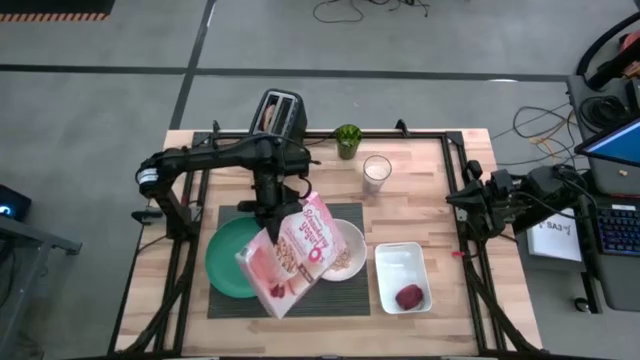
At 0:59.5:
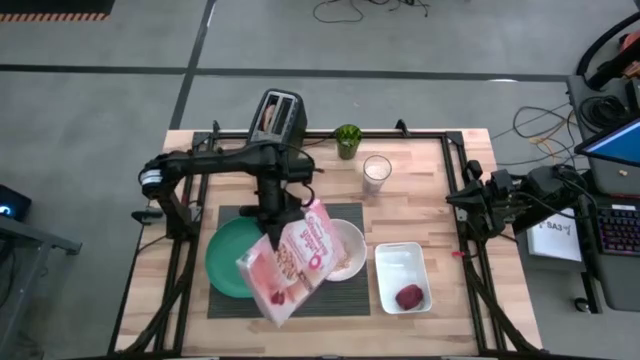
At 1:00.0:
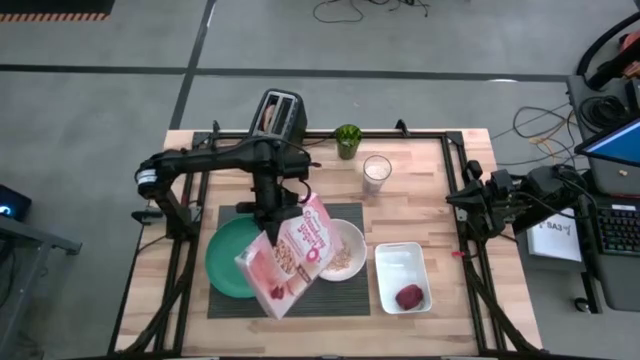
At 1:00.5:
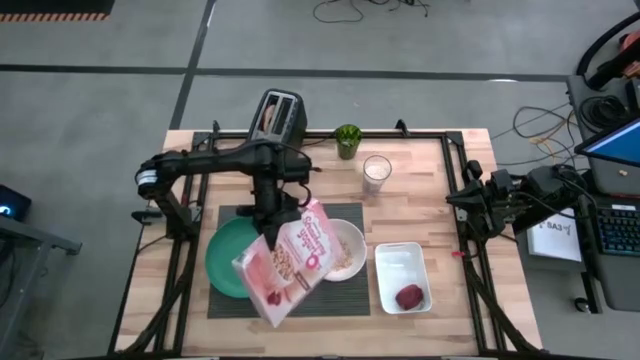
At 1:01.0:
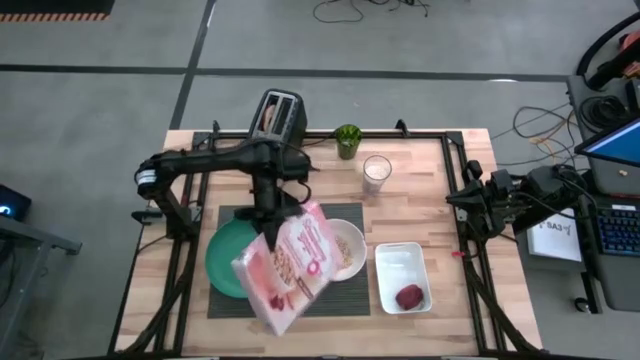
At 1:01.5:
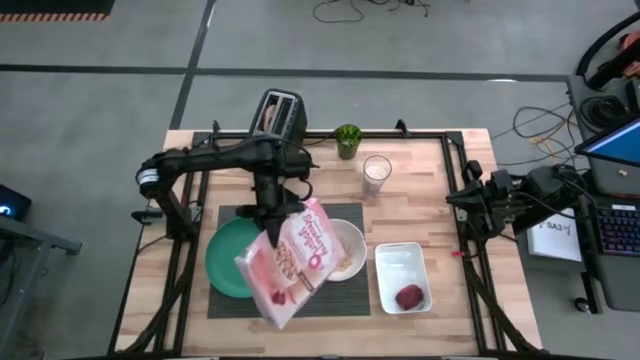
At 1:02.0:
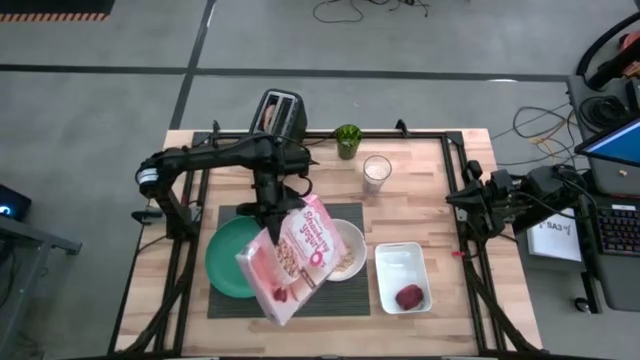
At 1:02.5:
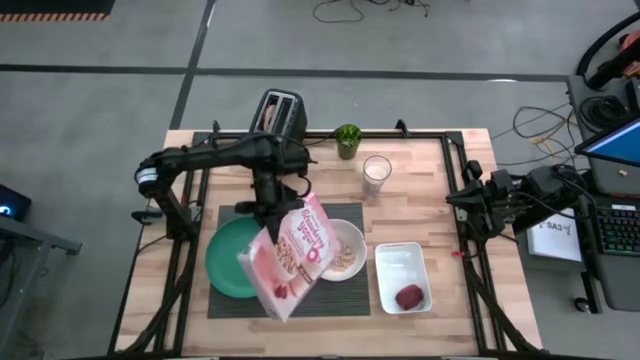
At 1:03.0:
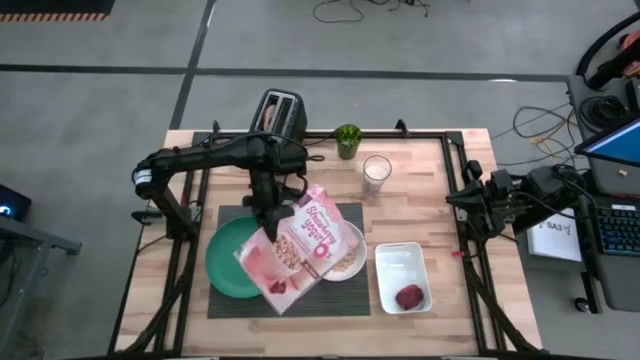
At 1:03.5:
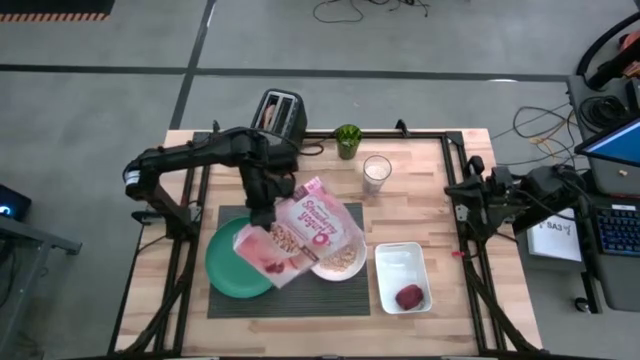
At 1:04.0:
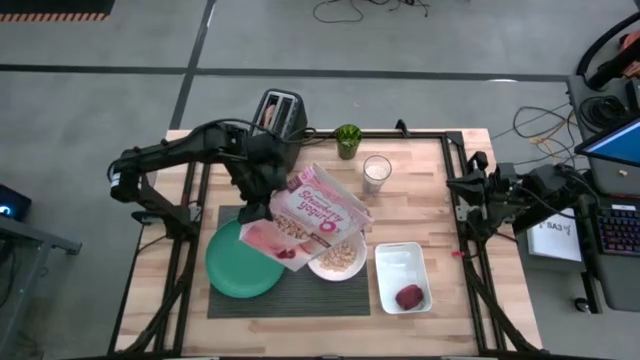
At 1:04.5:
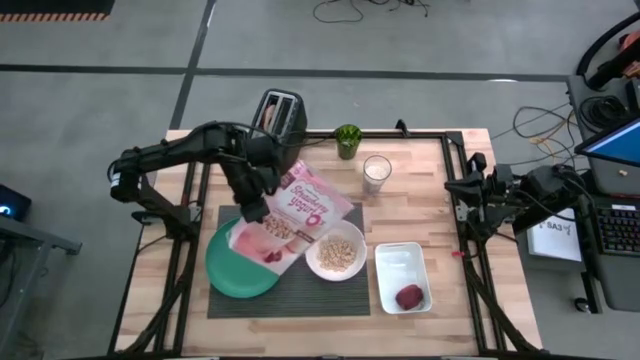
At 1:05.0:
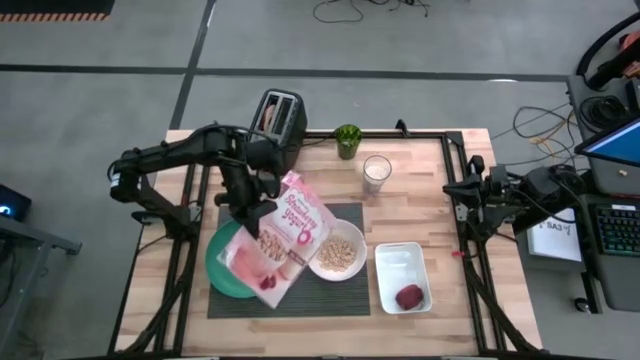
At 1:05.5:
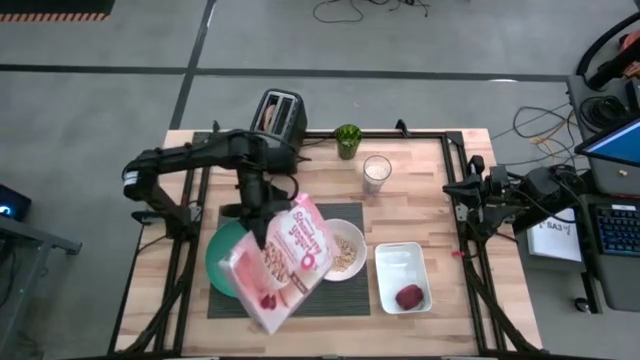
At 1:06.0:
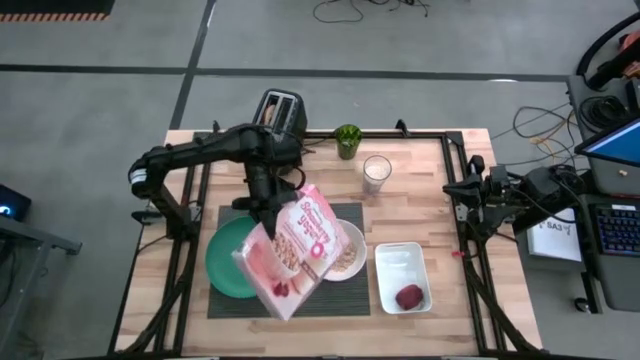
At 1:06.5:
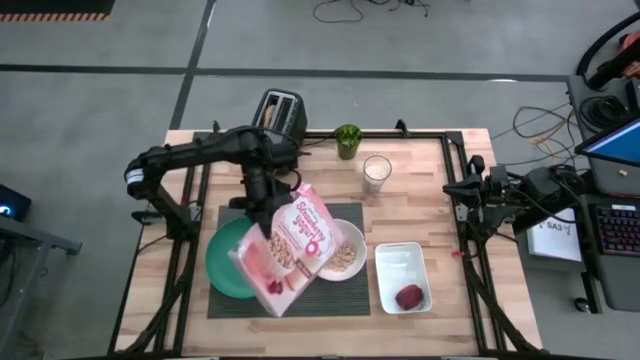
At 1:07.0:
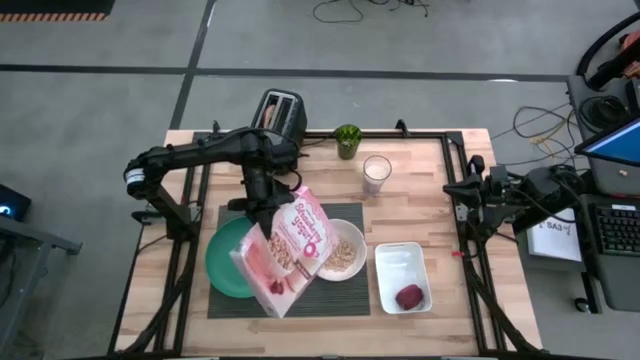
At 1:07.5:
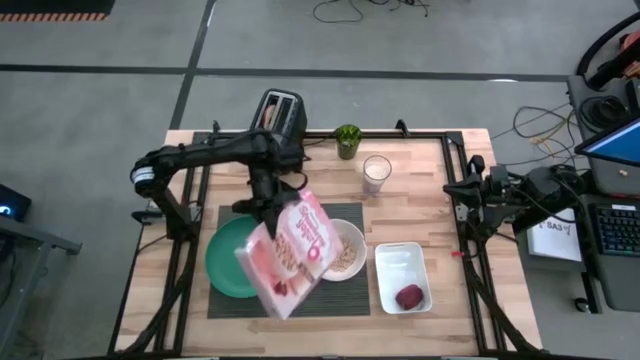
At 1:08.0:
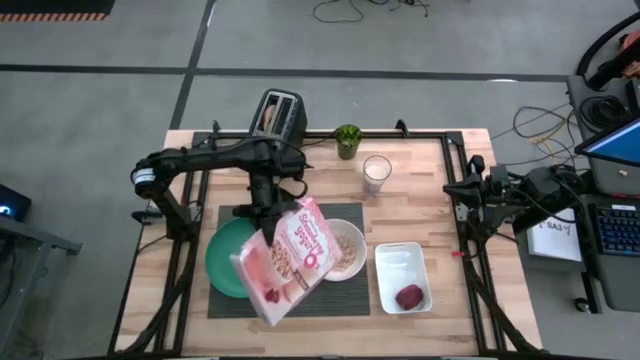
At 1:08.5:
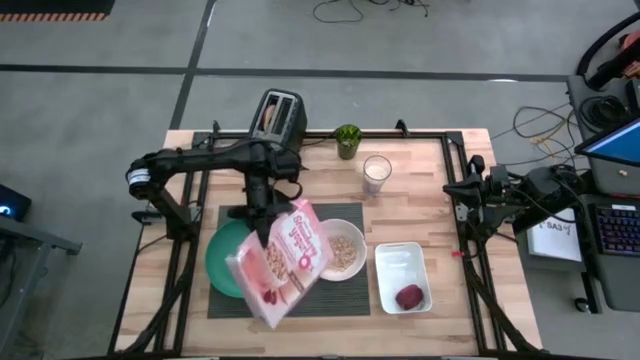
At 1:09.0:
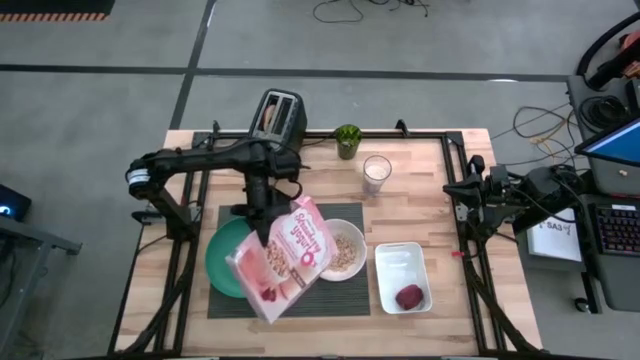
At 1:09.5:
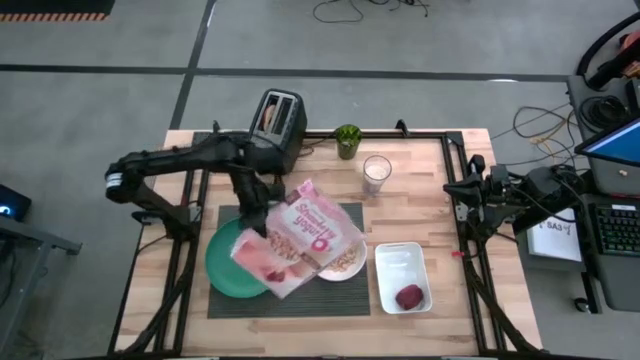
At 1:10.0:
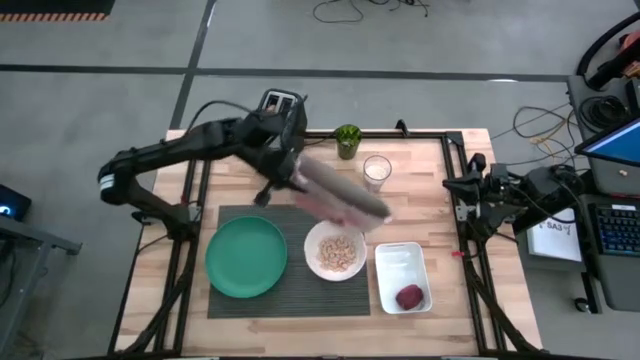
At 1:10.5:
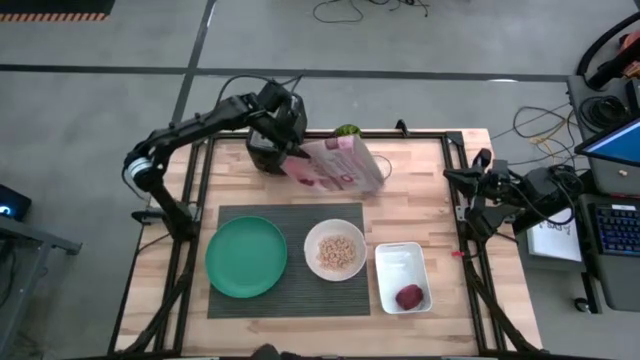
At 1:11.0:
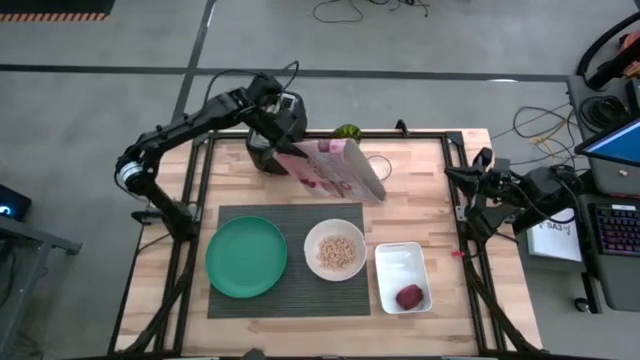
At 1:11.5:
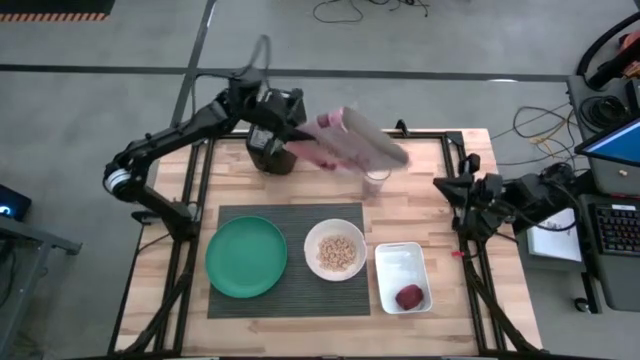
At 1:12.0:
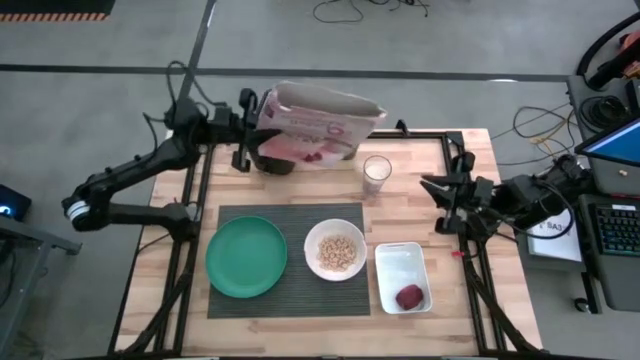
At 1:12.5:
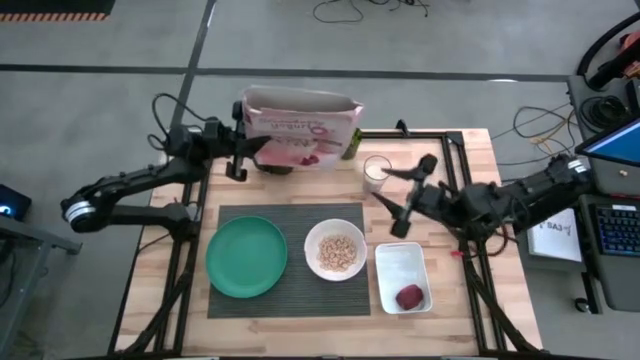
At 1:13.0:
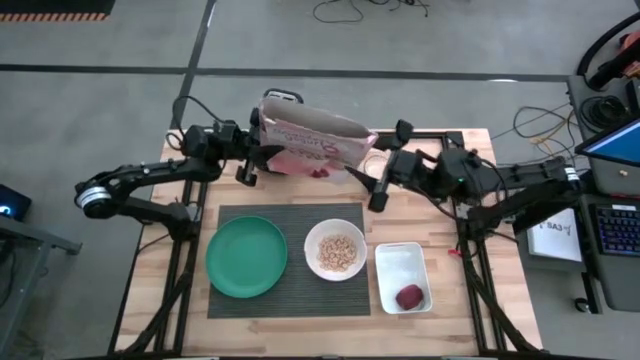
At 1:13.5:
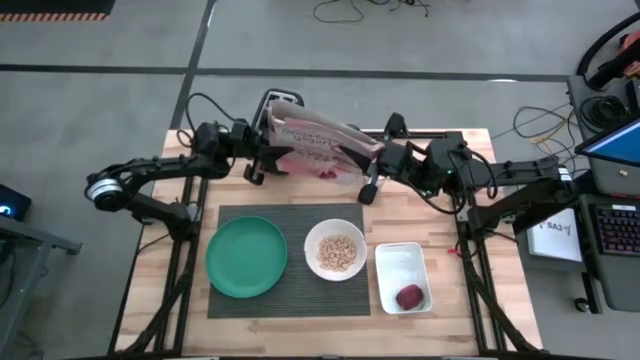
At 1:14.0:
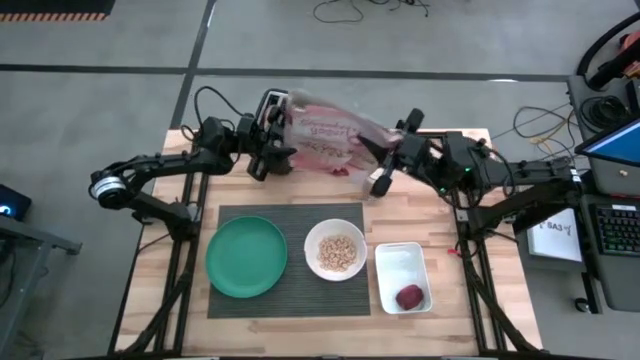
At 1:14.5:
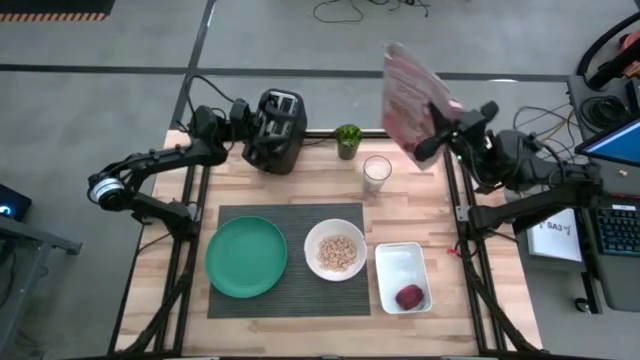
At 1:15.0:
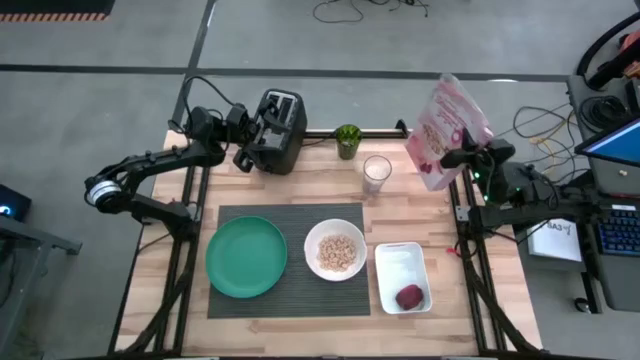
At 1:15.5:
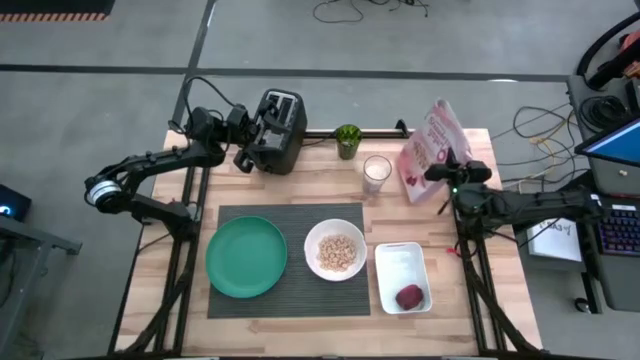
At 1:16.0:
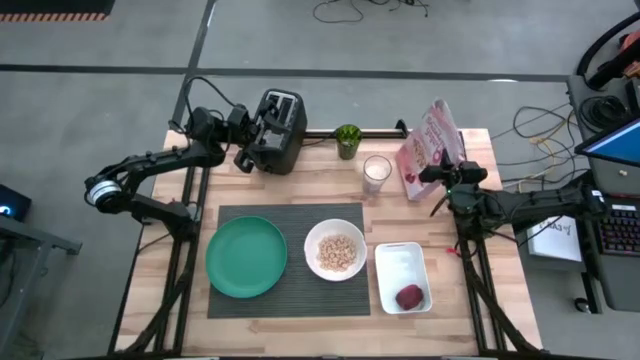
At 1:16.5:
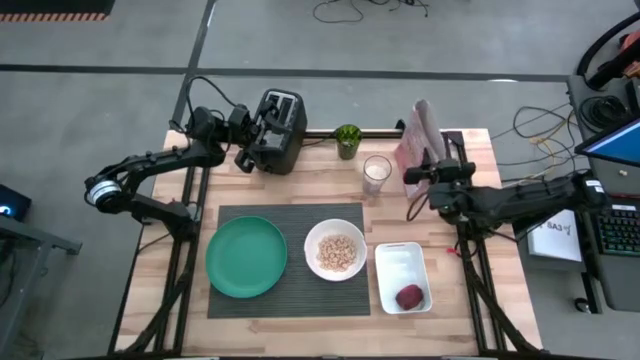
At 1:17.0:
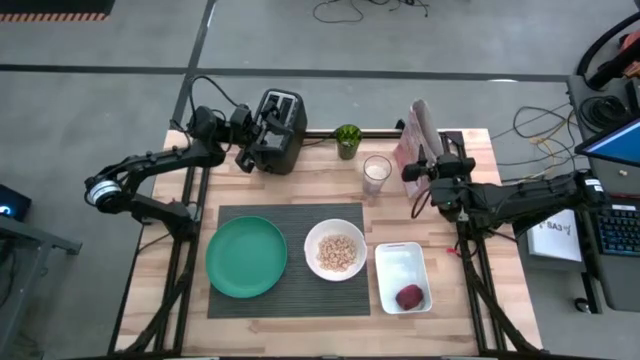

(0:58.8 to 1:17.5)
Task: Arrange a breakfast setting
Pour the cereal into the white bowl

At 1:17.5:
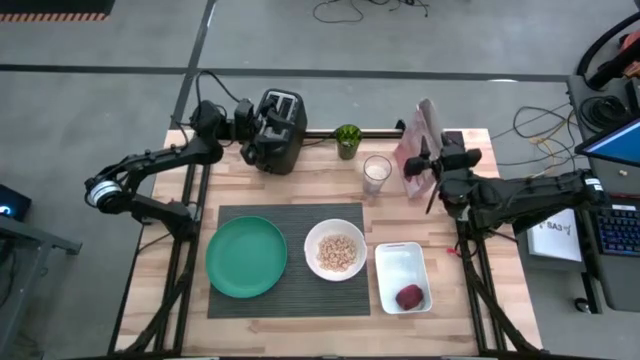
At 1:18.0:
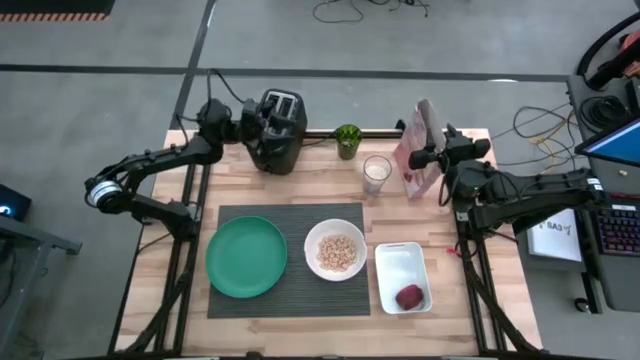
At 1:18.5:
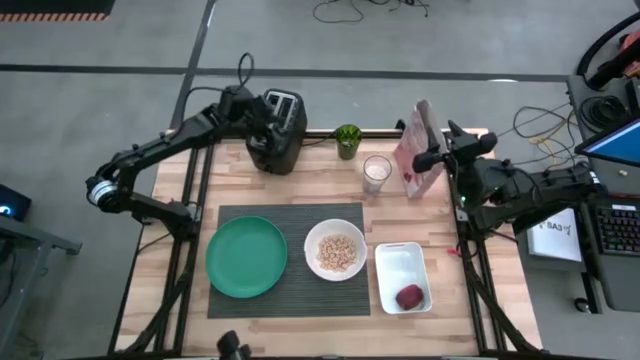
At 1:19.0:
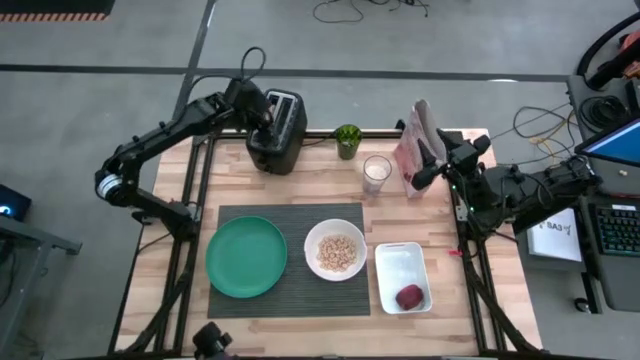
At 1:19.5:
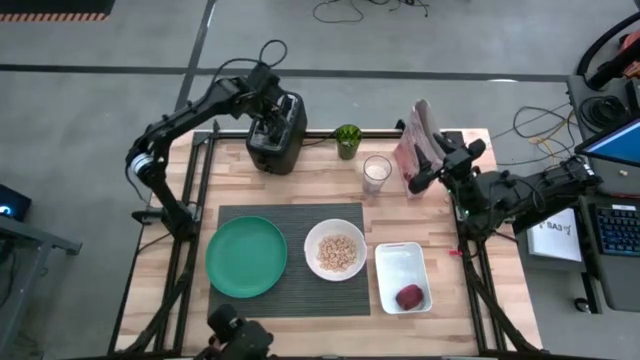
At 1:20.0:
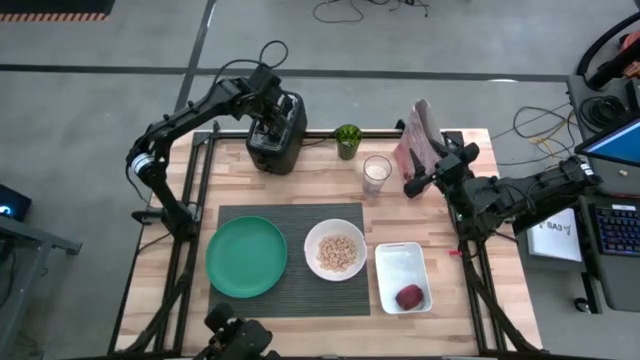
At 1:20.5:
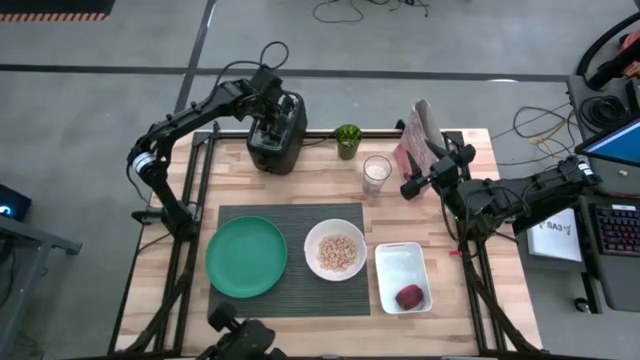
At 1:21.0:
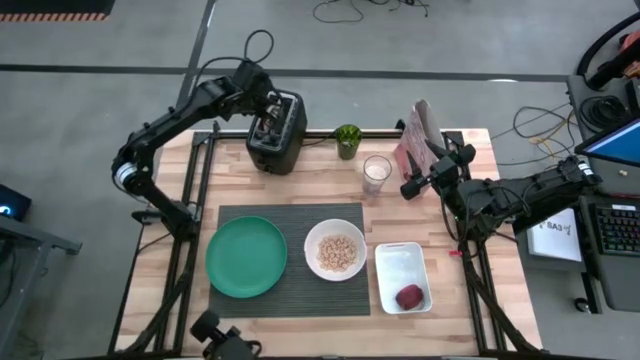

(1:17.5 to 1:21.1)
Put the bagel on the green plate
